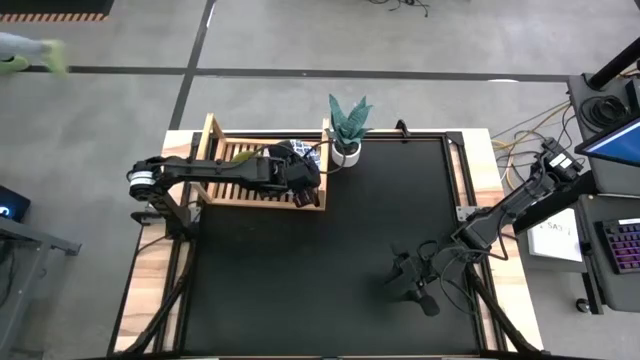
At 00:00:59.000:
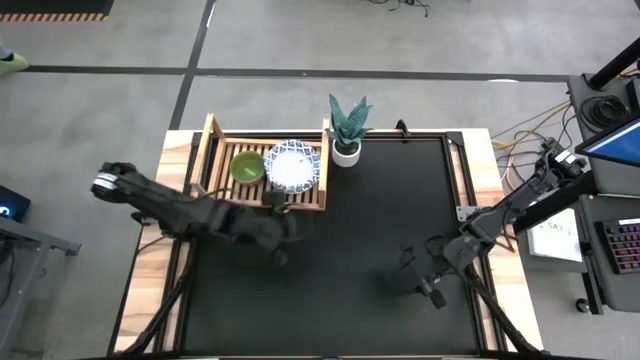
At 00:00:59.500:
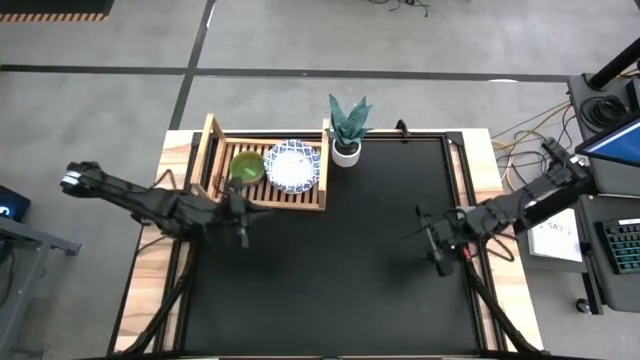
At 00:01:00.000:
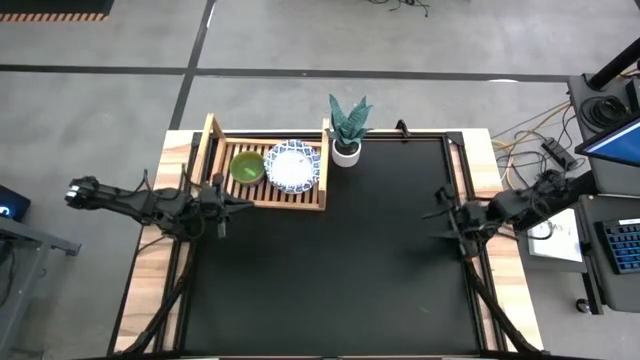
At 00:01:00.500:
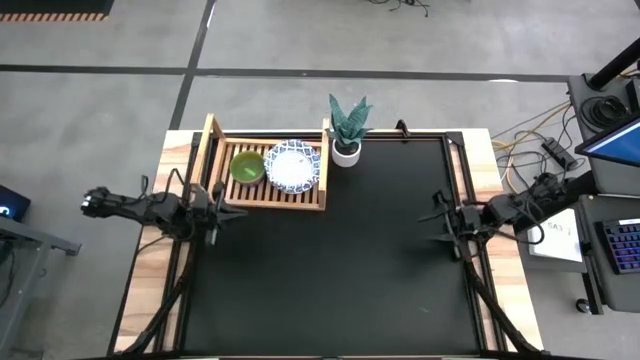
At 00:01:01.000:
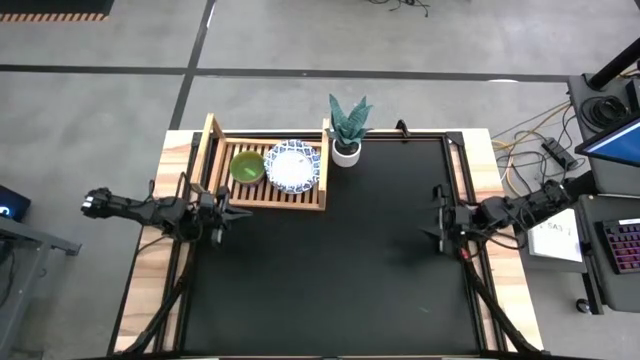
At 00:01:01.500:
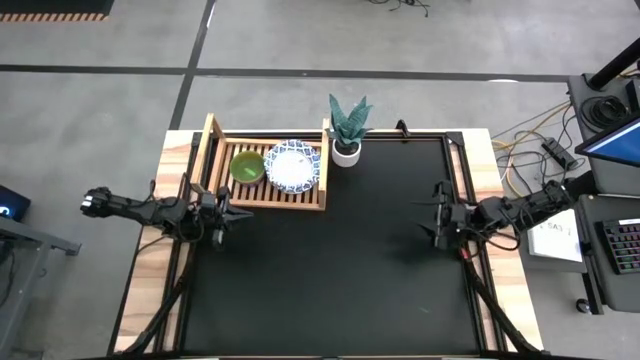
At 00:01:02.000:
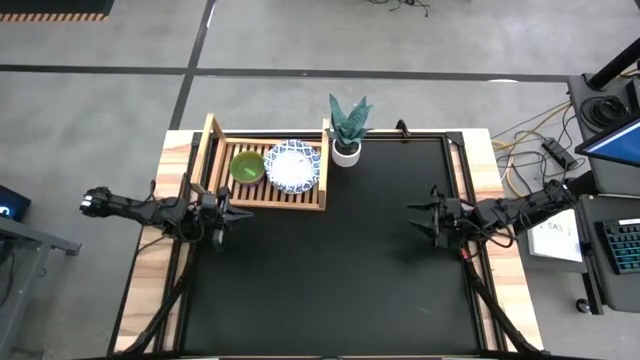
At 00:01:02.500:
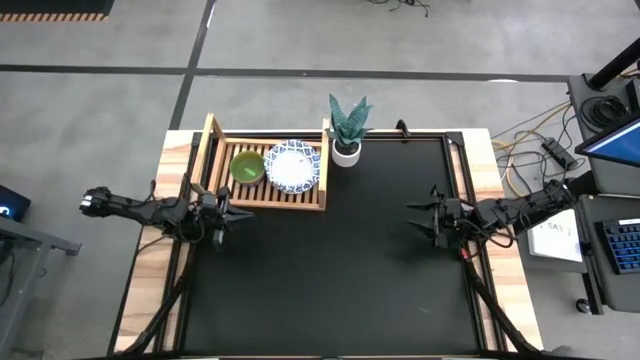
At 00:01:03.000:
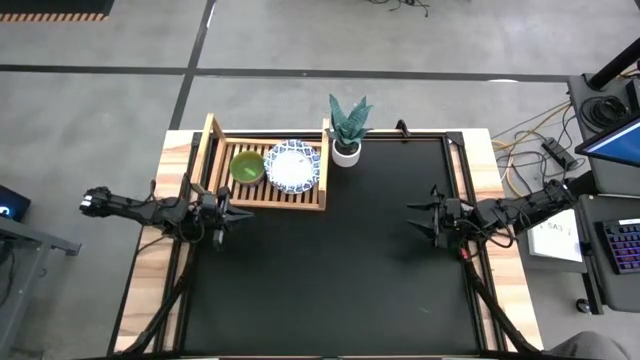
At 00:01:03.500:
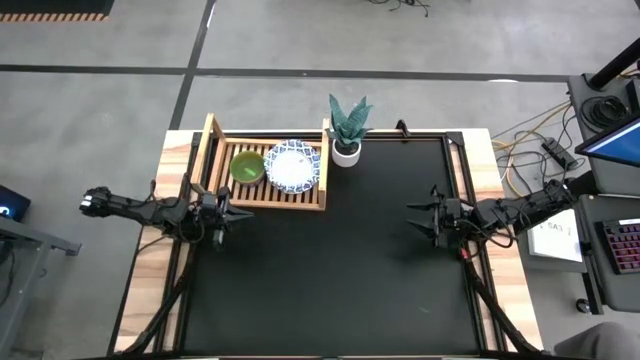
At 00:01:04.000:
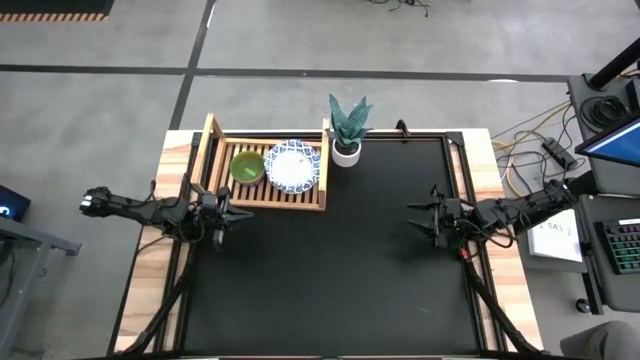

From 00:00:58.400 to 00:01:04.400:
Task: Place and stack bowls onto a shelf
Return to Home Position

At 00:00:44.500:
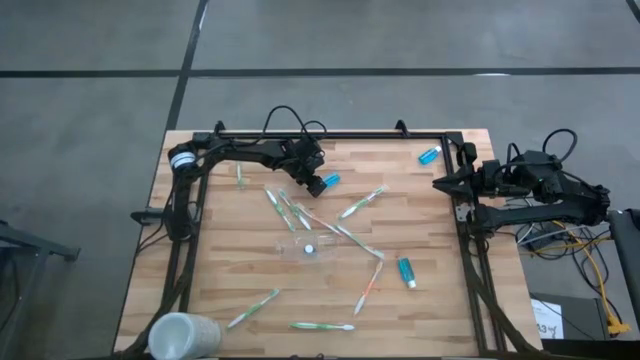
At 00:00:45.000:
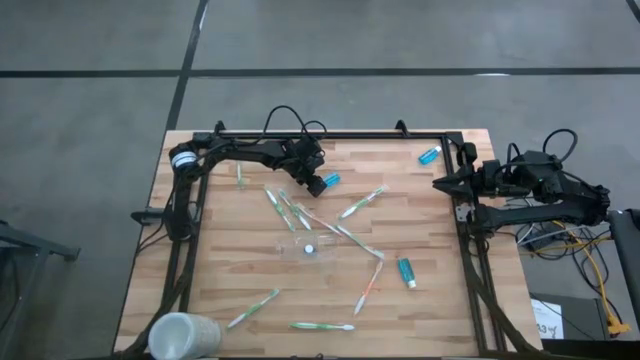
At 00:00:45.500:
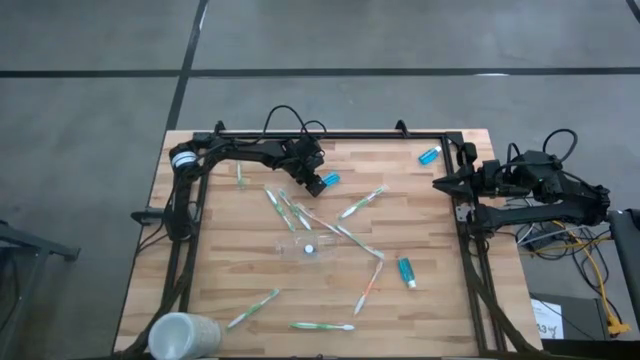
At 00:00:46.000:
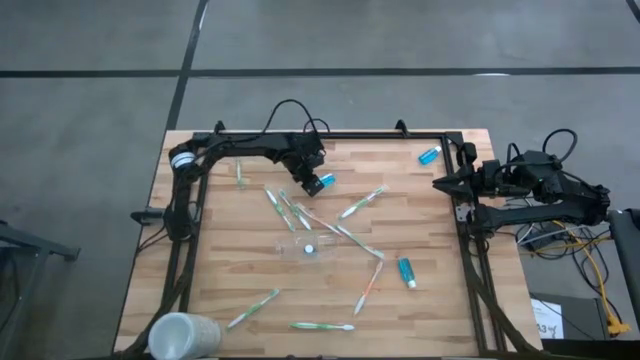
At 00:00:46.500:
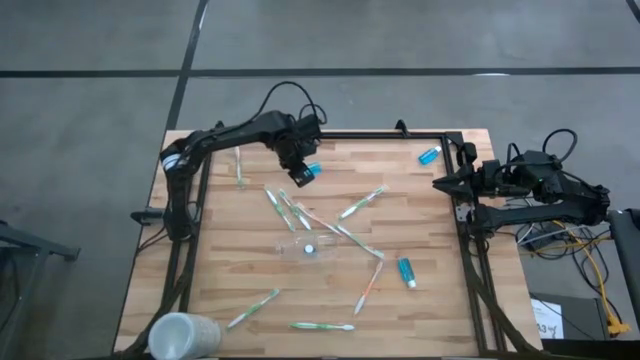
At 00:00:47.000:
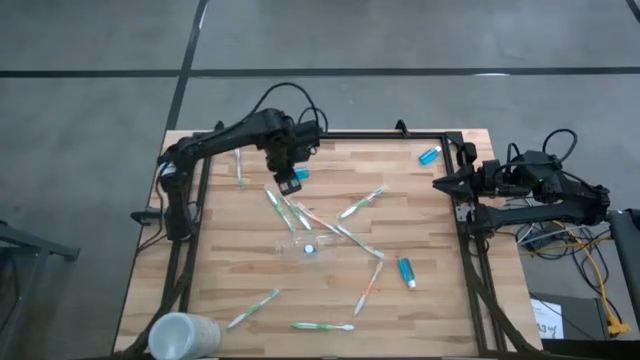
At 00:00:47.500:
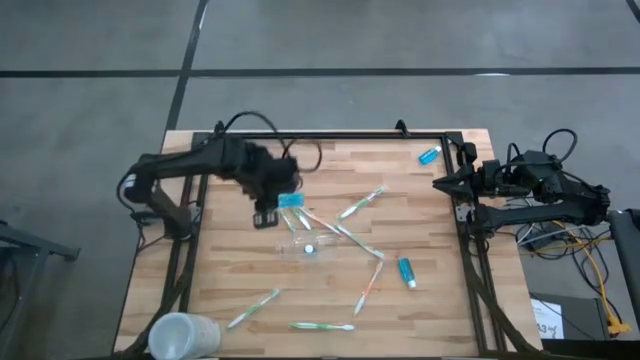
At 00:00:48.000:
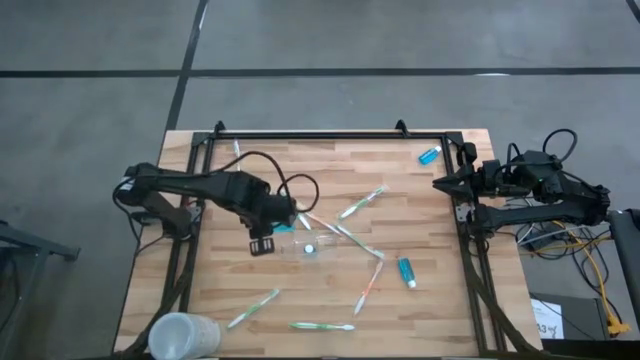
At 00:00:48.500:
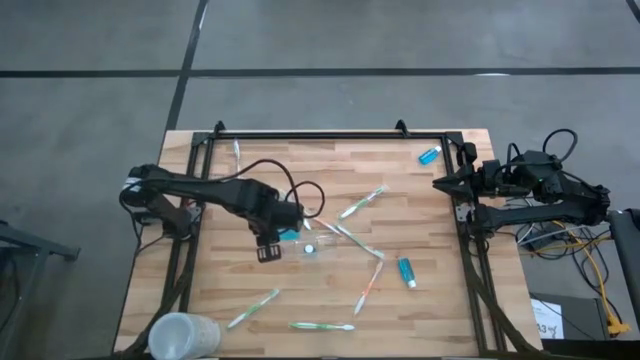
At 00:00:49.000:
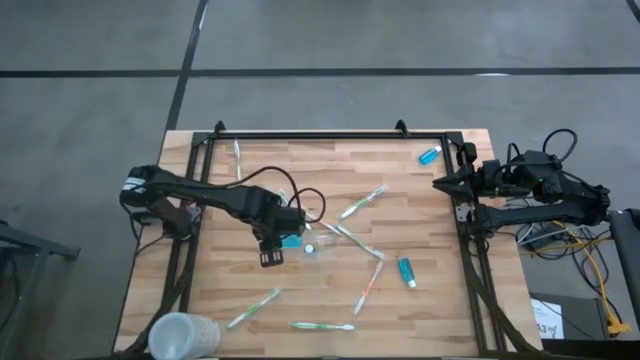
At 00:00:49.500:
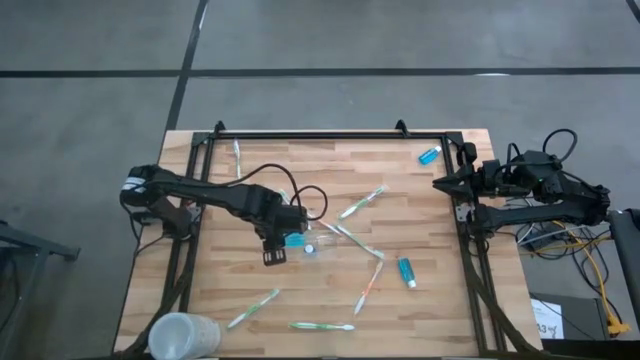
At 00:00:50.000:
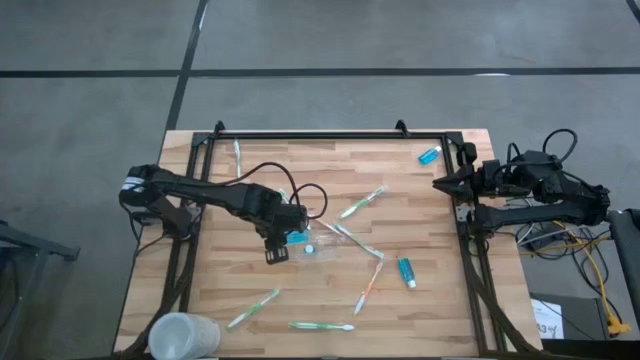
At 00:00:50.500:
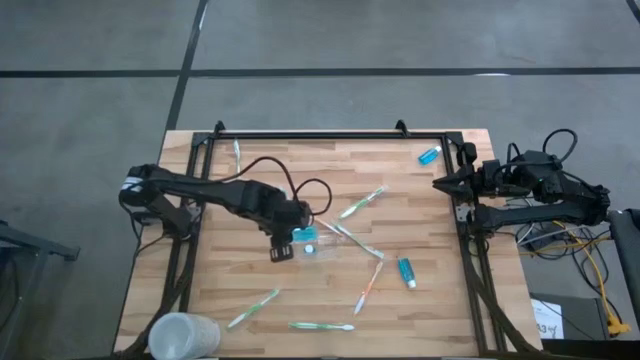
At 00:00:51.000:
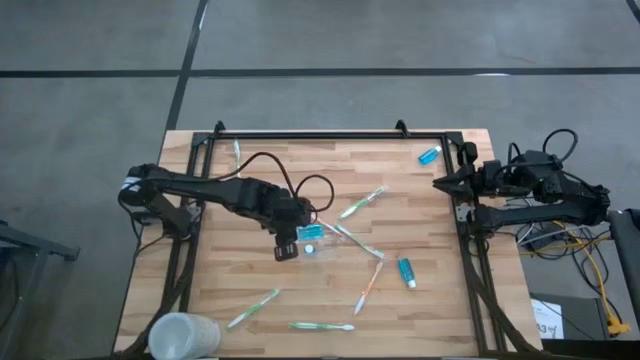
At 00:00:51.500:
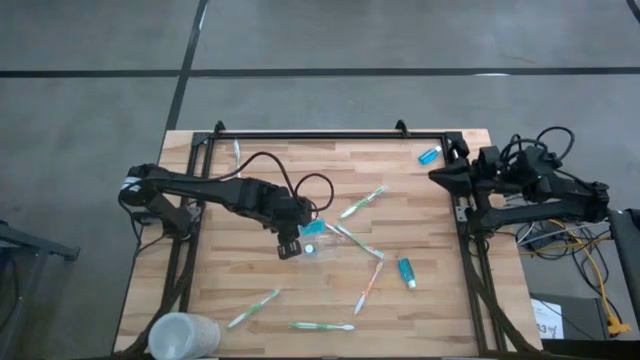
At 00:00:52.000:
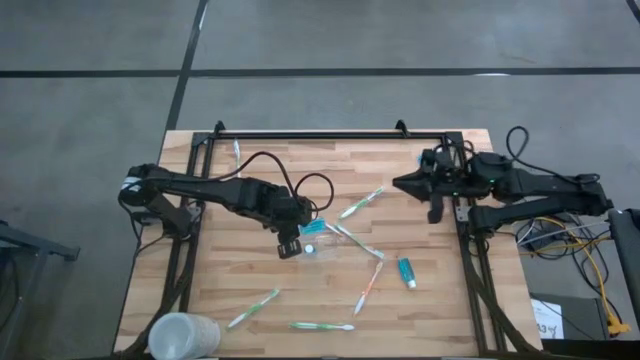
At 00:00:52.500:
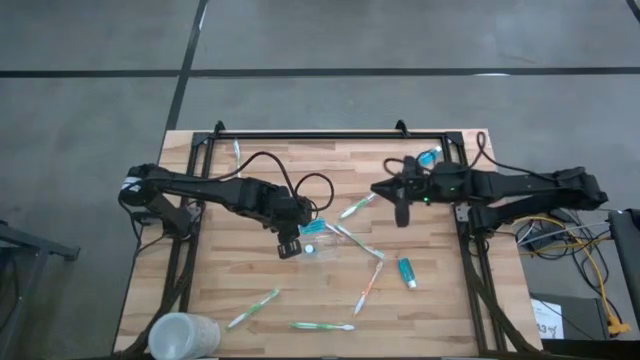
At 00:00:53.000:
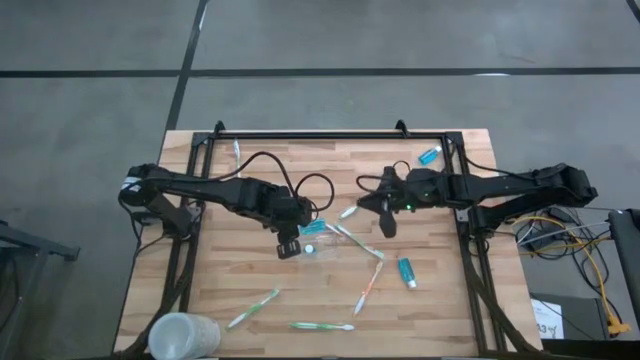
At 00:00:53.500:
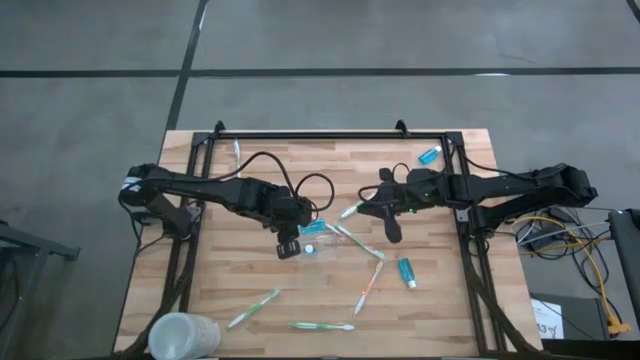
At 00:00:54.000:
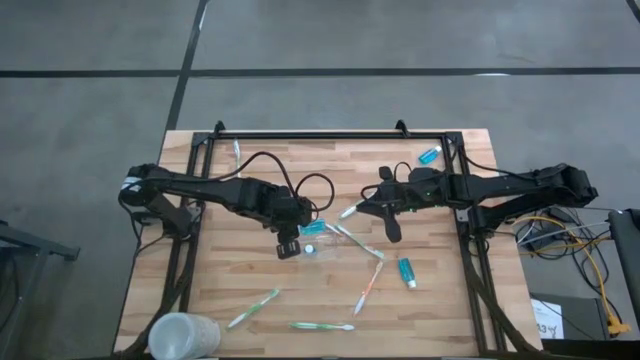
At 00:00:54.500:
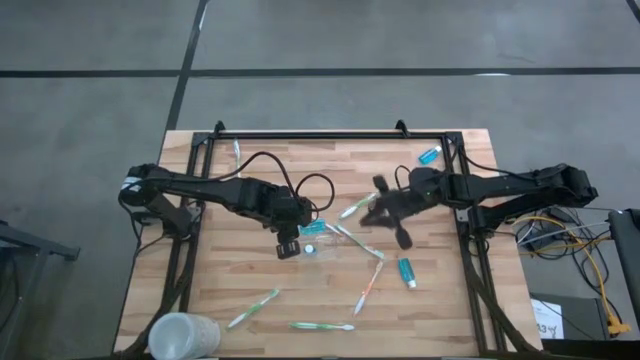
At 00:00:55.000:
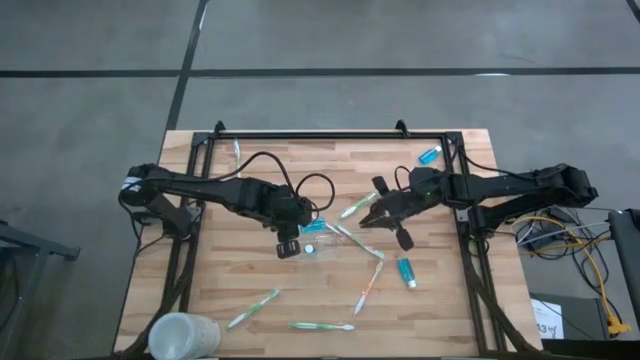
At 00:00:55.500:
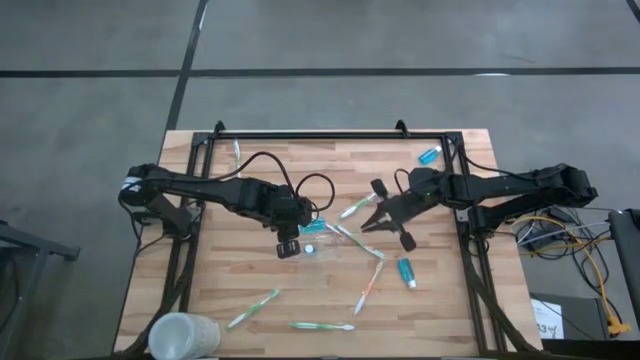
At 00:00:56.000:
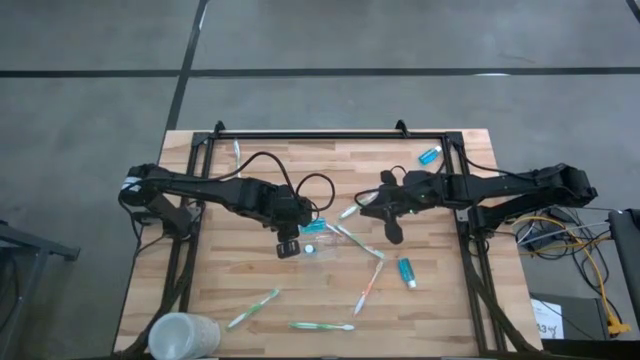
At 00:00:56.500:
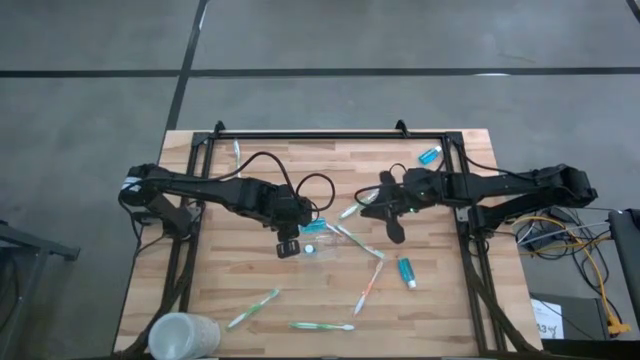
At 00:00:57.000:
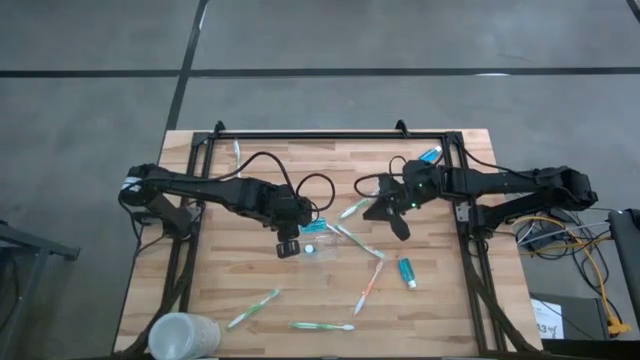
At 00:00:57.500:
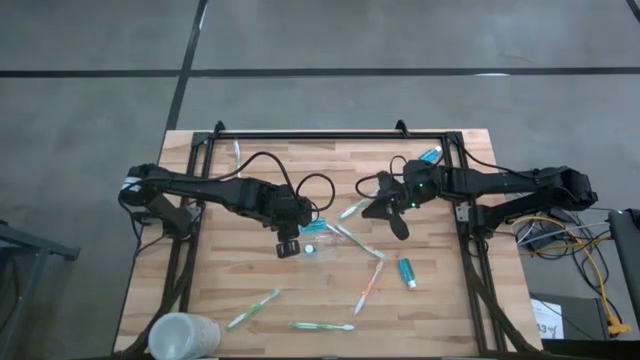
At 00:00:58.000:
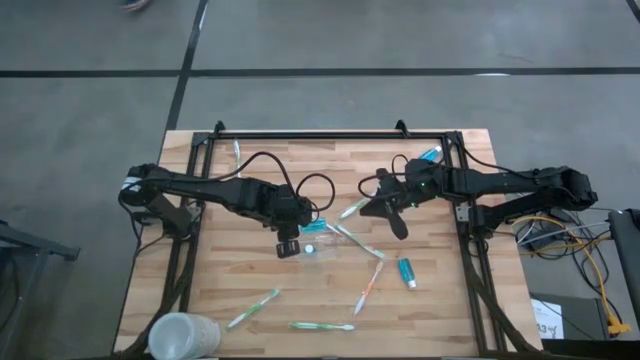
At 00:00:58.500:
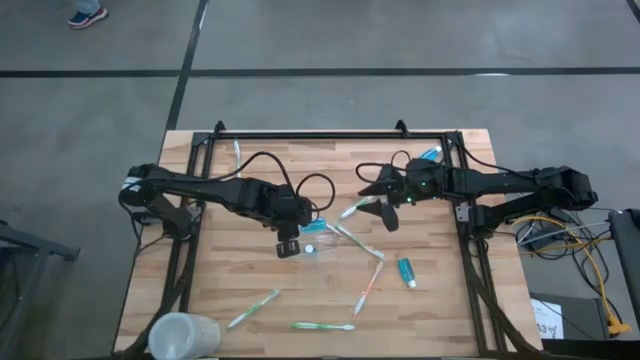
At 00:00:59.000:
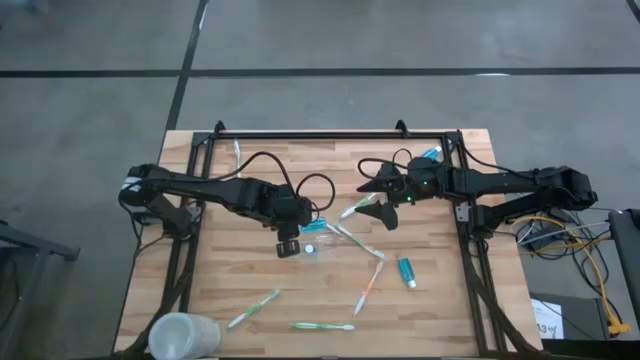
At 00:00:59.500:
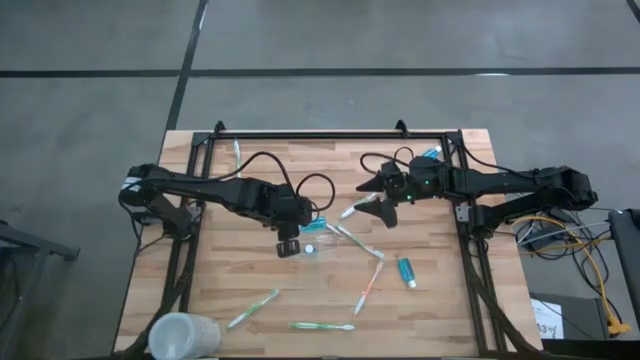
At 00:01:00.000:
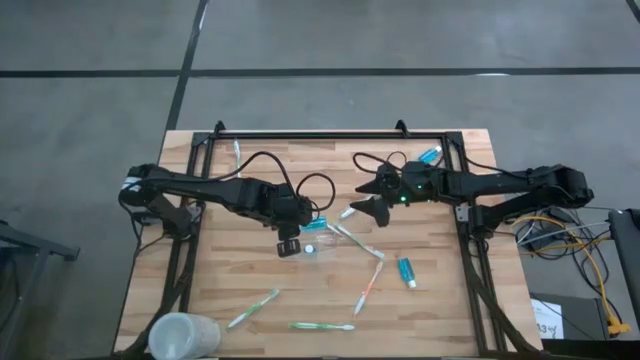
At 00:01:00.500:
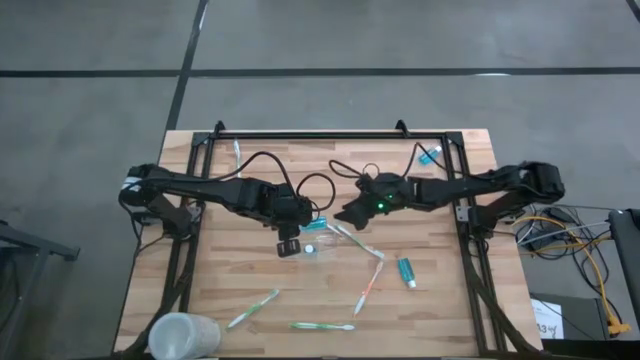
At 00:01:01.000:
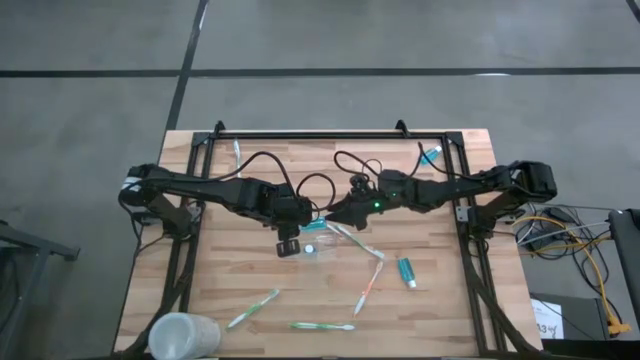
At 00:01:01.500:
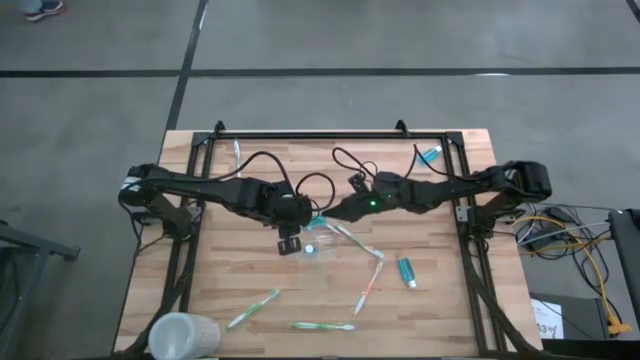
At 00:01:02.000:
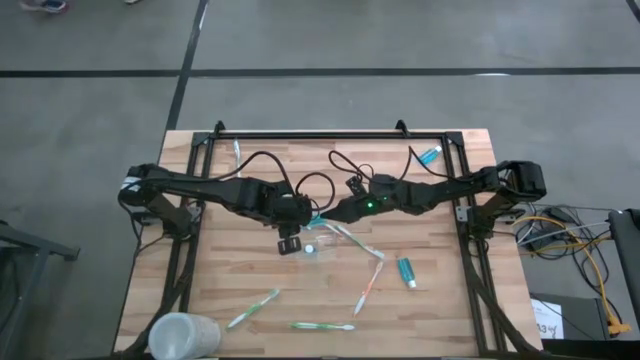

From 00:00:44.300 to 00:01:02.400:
Task: Pick & Place toothbrushing station
Put the blue mouthwash bottle into the transparent organizer
